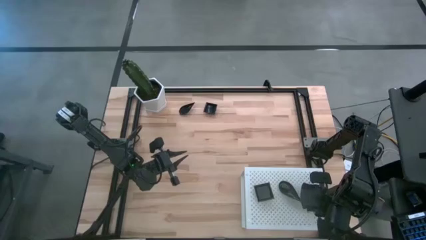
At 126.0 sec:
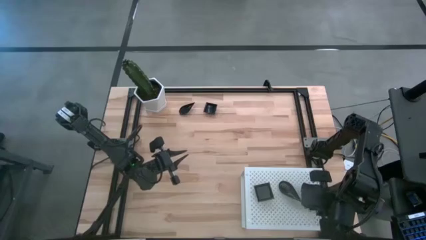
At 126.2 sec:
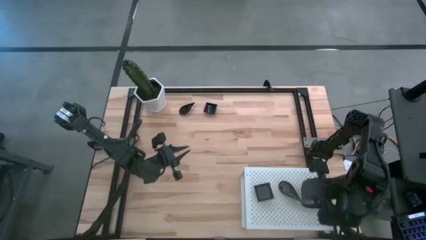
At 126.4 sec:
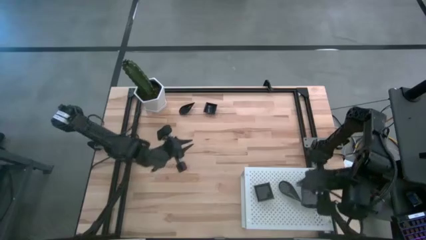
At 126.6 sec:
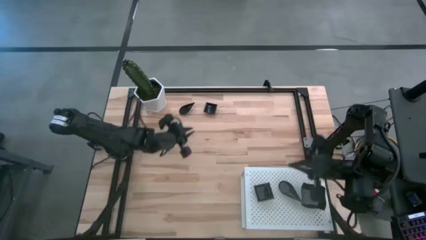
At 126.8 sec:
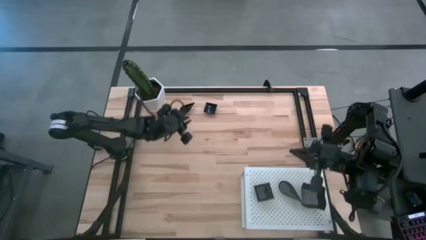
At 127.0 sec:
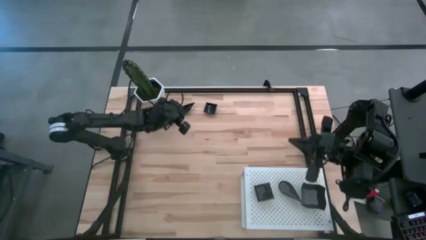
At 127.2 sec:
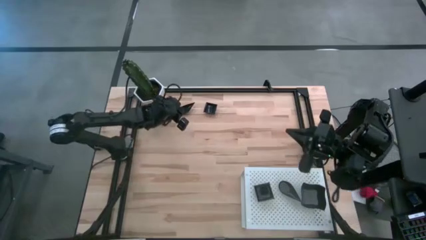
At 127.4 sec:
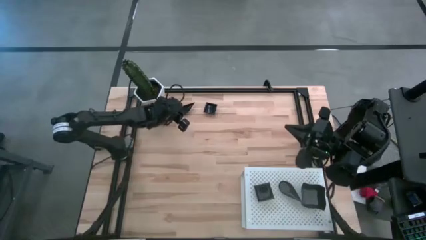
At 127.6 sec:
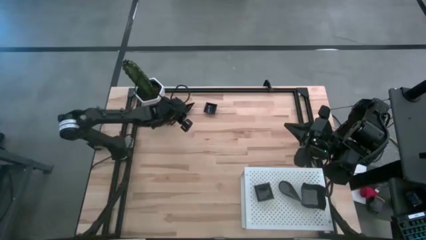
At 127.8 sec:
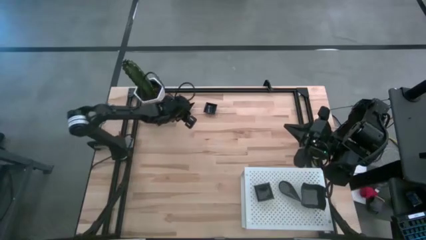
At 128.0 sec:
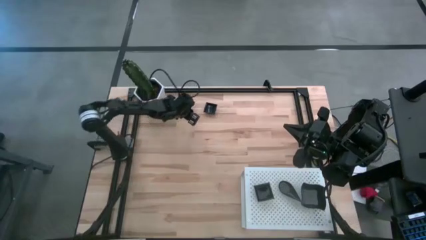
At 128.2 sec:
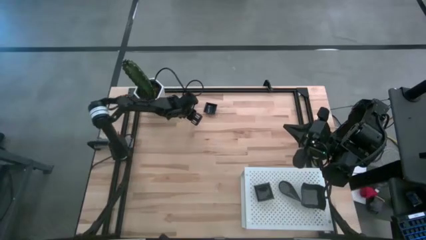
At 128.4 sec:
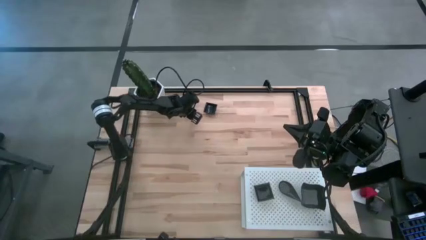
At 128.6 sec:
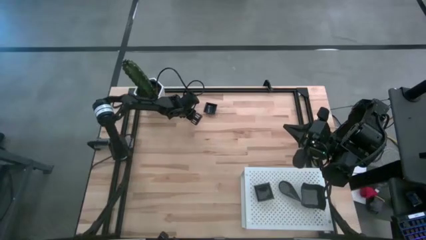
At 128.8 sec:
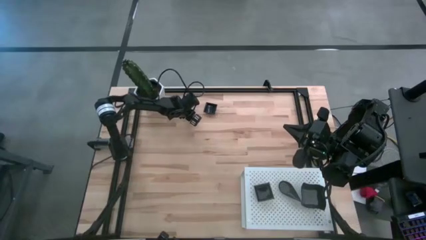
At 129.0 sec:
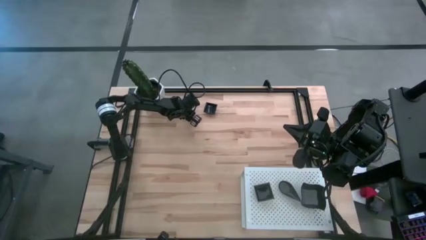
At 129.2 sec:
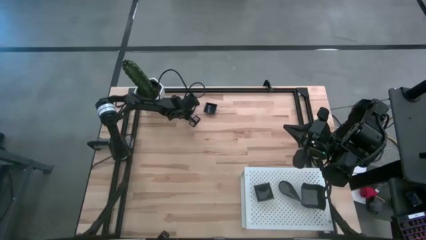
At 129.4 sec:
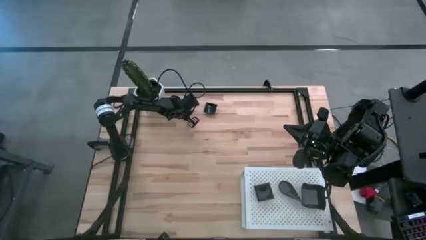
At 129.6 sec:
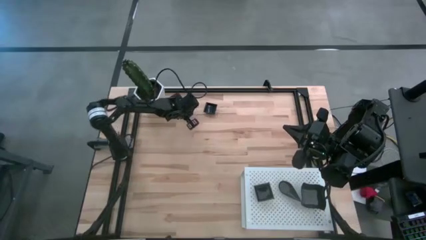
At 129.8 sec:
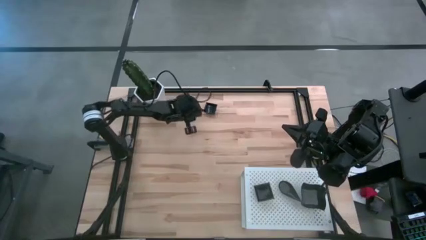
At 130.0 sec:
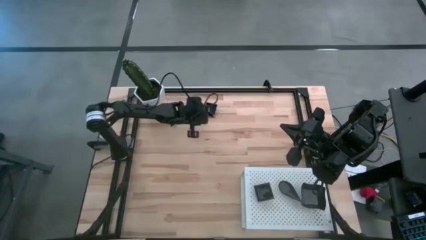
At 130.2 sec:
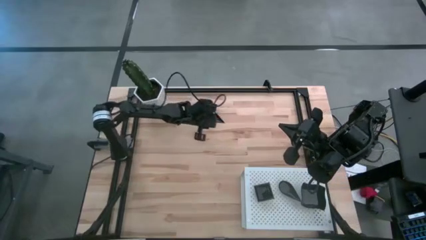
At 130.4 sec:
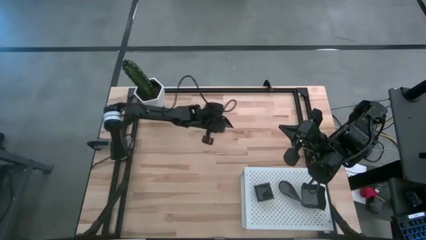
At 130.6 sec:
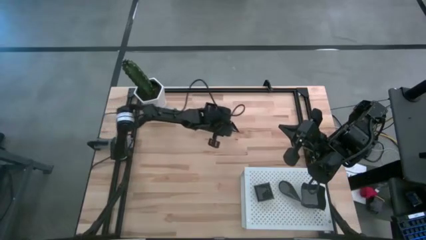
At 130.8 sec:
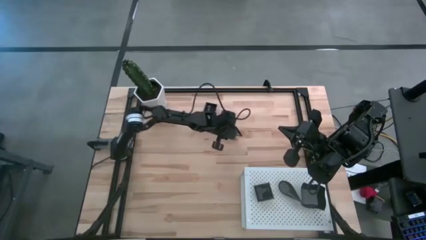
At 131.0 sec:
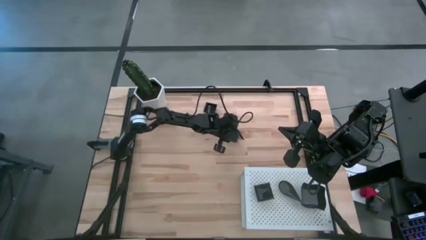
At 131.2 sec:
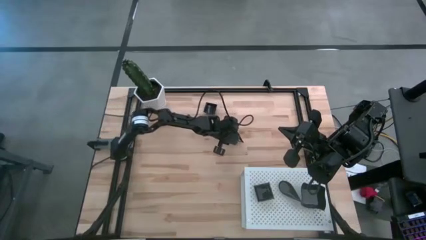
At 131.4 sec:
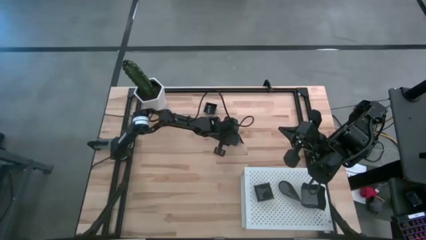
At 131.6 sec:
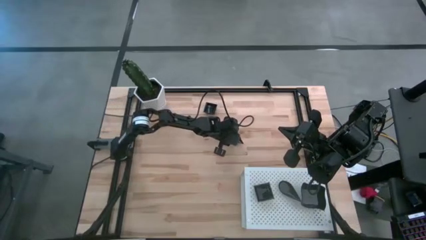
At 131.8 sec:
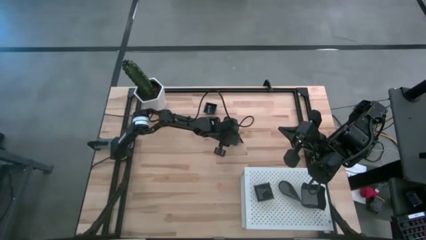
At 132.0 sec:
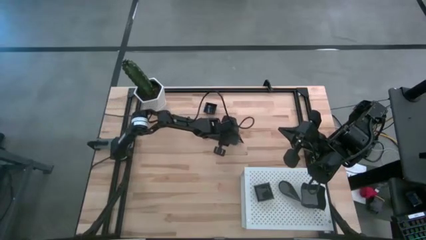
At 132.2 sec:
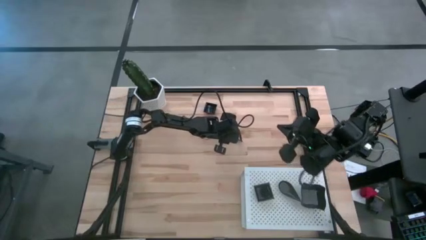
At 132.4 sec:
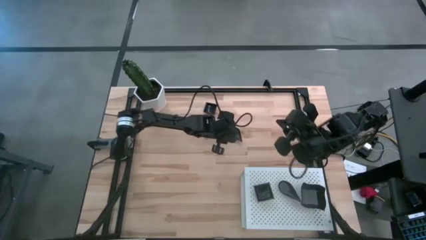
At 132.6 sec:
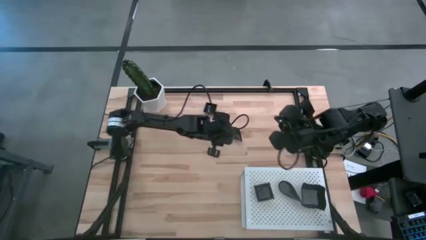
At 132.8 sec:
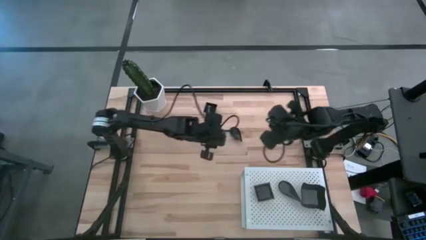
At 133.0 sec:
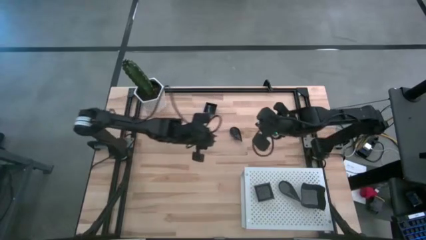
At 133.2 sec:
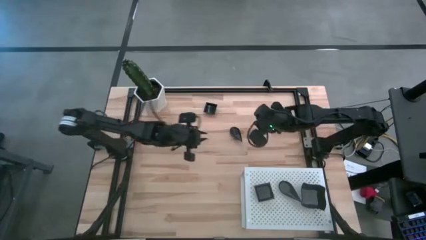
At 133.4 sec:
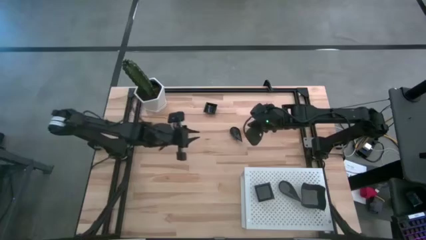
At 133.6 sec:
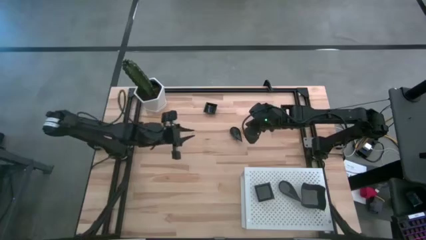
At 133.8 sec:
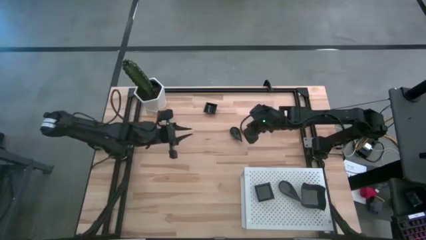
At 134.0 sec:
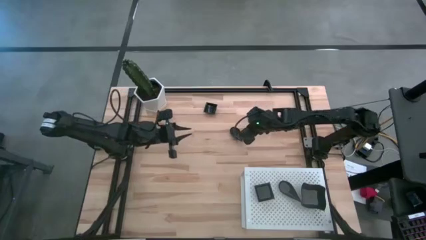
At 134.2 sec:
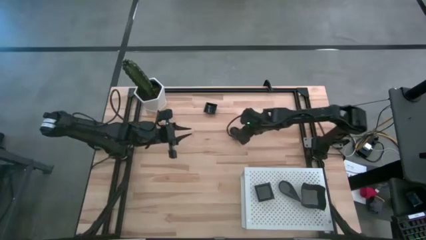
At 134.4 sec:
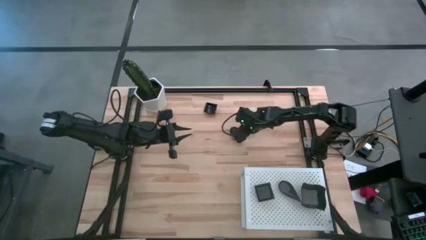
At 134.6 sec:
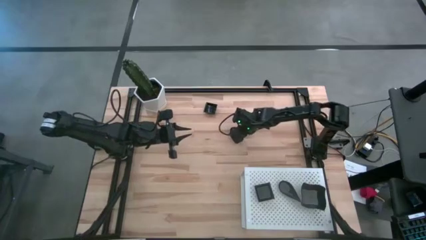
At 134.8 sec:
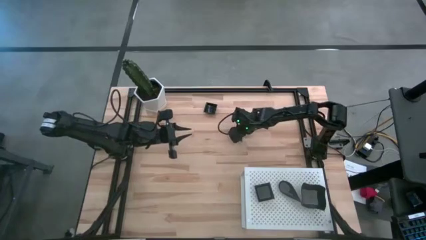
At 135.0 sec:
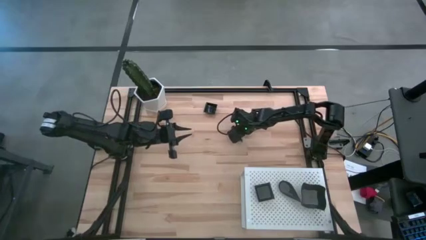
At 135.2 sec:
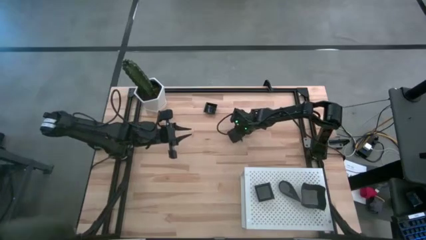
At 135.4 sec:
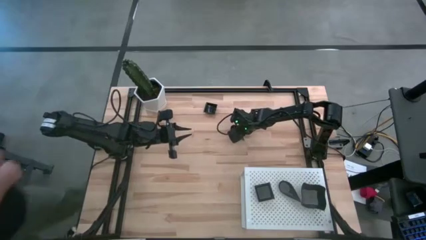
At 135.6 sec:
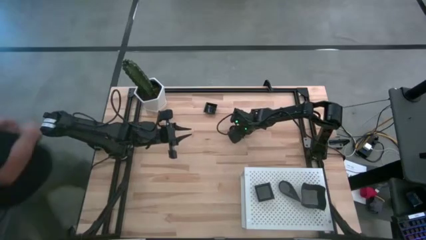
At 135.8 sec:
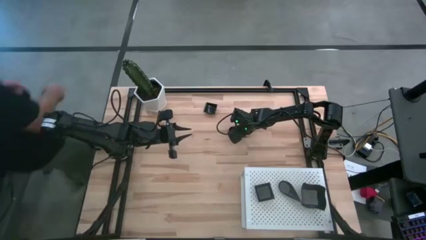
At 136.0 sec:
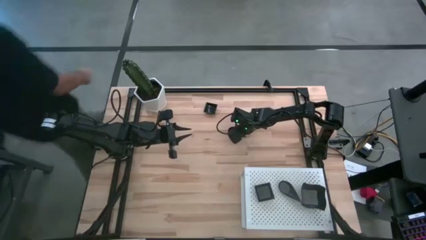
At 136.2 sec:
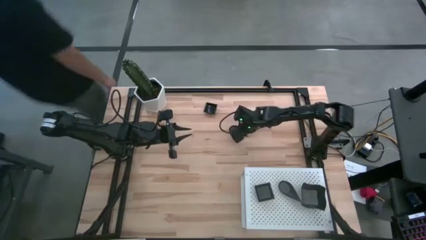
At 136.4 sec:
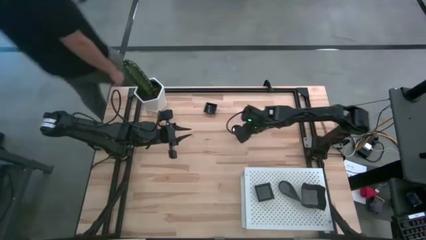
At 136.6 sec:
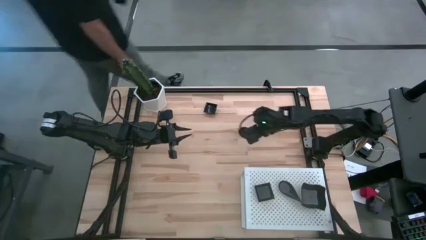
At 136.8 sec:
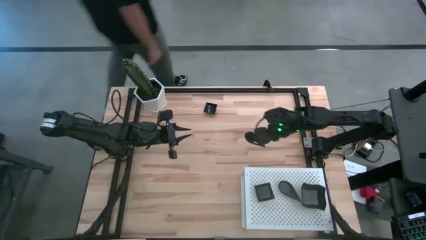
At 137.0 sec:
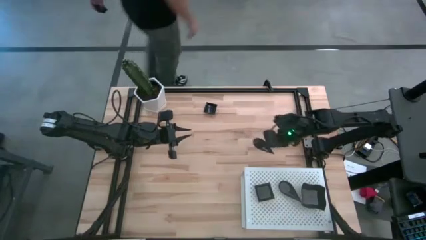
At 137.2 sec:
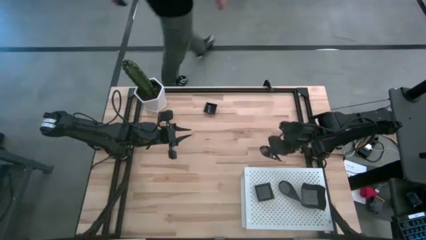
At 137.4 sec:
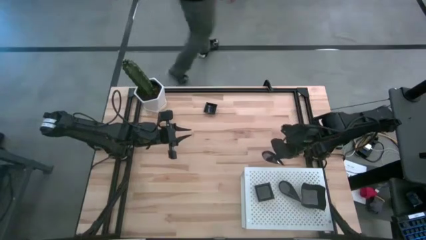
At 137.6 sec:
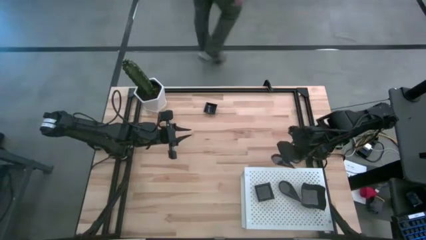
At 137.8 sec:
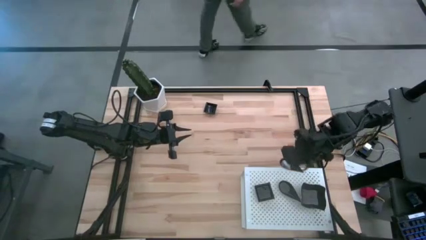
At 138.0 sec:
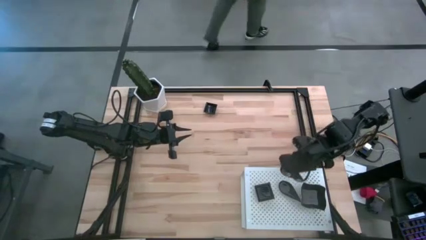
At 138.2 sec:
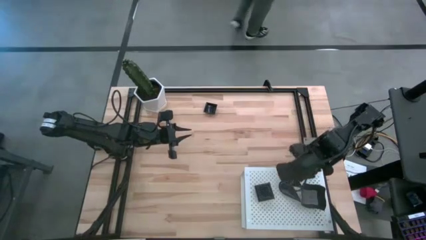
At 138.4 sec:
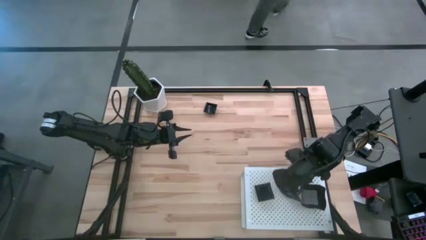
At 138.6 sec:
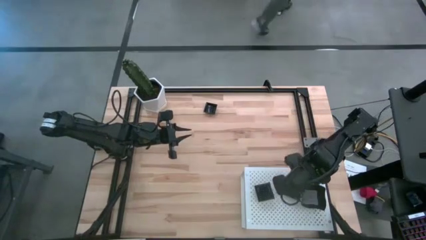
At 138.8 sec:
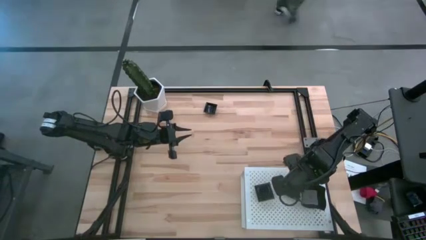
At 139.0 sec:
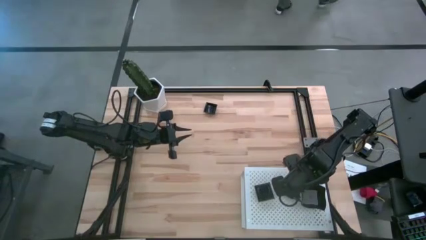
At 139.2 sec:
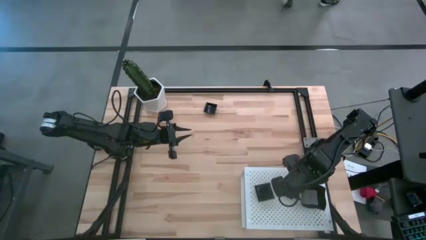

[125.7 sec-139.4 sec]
Task: Pick & Place Mini shaped plates
Stack the drop-shaped plate on top of the other drop-shaped plates on the shelf

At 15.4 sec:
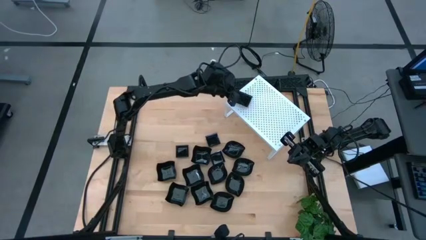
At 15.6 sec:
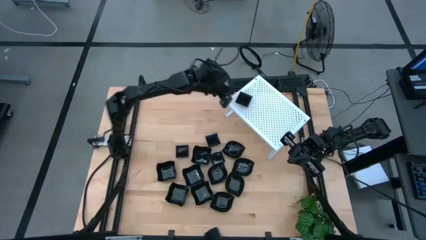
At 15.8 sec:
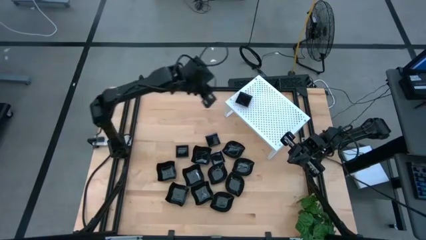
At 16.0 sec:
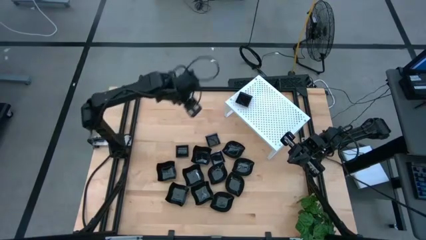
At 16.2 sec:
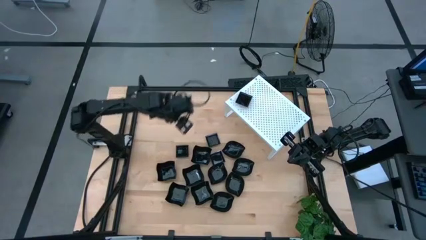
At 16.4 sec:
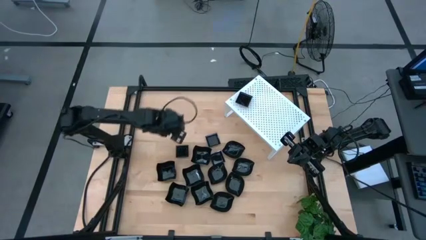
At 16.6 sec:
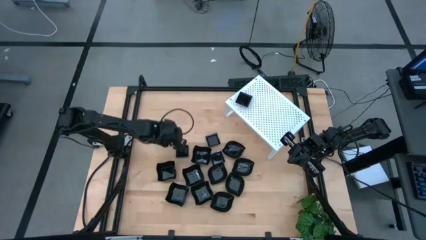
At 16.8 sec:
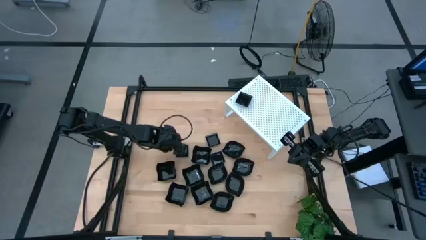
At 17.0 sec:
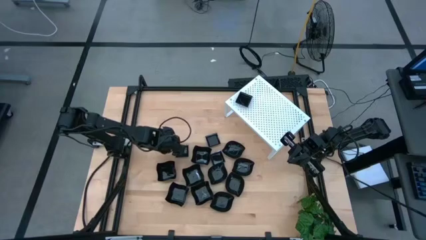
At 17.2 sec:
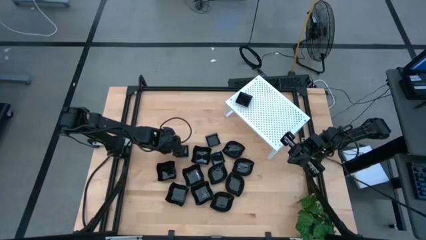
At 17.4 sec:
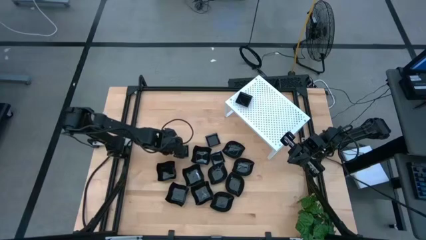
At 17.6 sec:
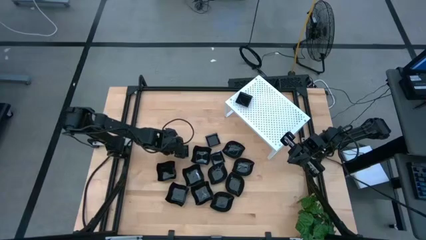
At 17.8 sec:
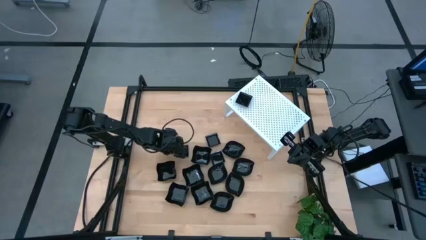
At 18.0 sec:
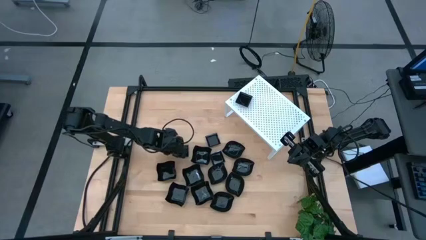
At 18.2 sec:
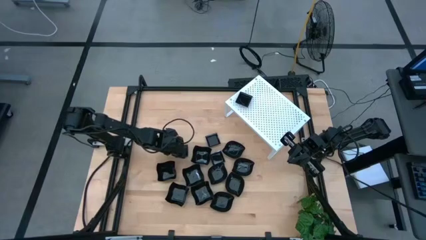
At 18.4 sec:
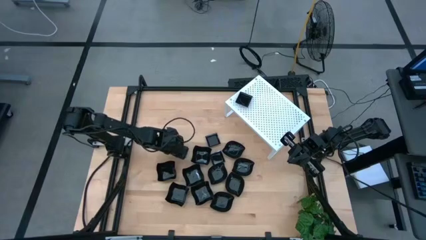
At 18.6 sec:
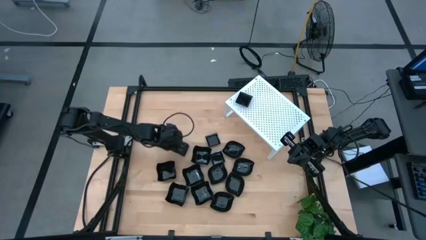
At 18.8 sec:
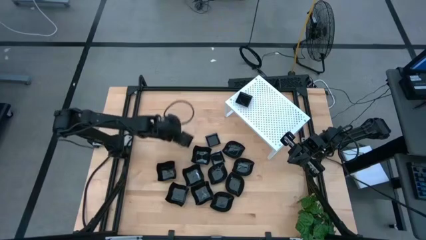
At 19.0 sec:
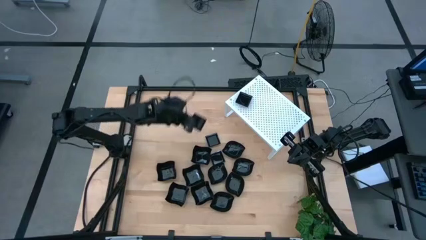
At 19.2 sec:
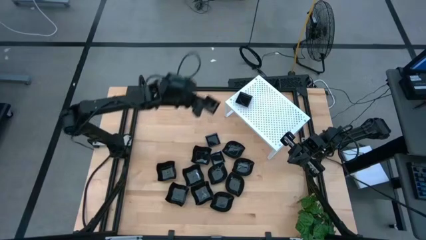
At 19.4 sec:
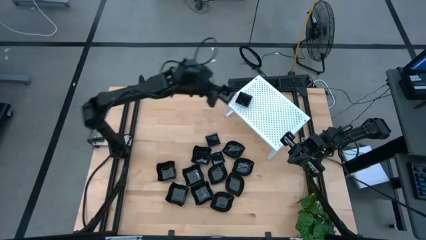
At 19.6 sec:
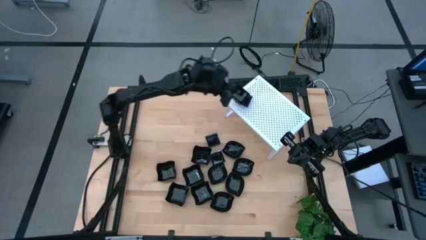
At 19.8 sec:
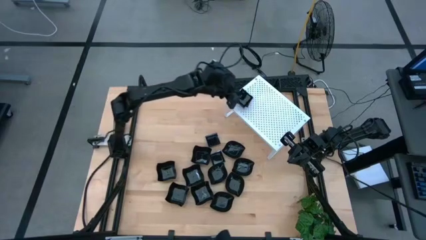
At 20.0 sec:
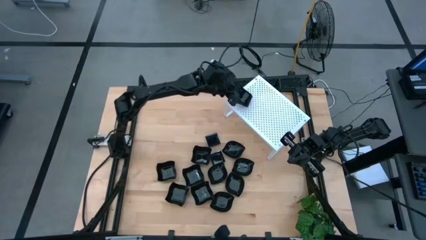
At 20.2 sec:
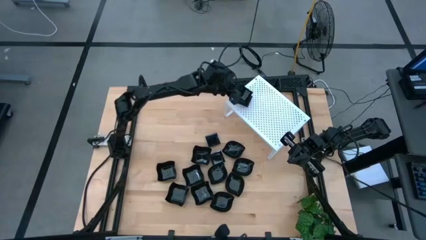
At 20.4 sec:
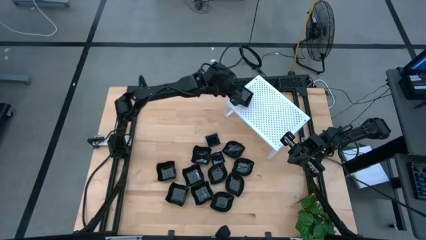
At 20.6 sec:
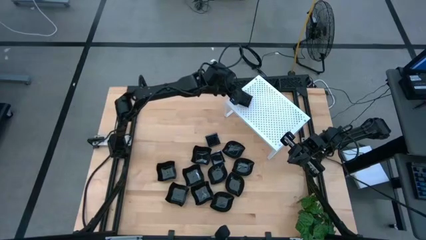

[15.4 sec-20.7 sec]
Task: Pick & Place Mini shaped plates
Stack the black square plate on top of the other black square plates on the shelf
